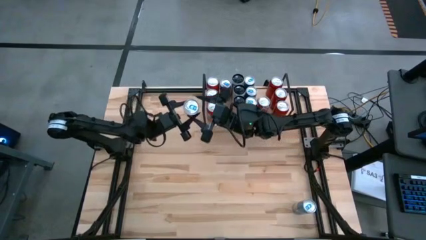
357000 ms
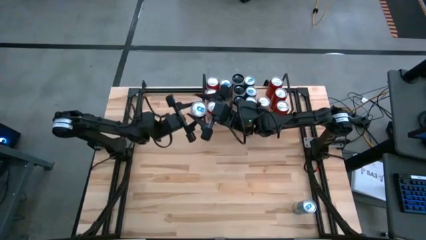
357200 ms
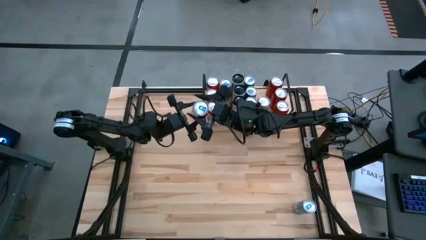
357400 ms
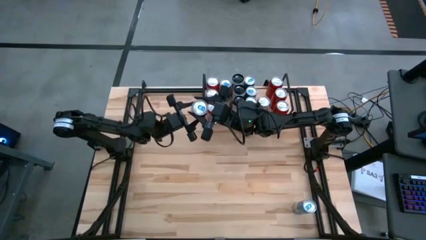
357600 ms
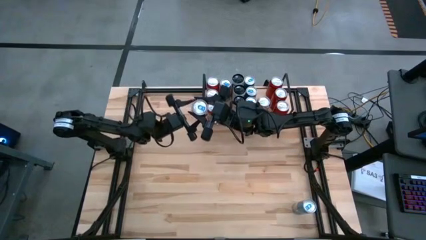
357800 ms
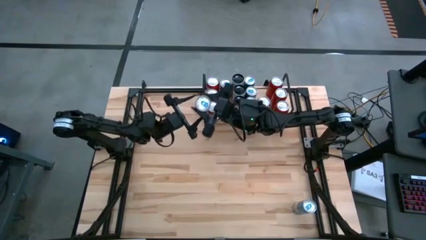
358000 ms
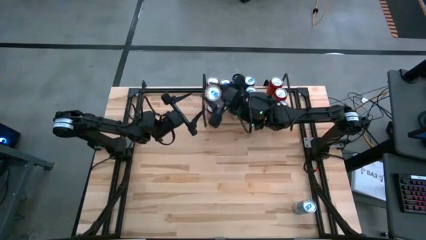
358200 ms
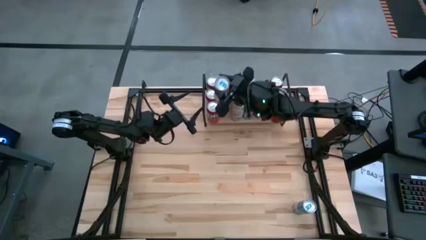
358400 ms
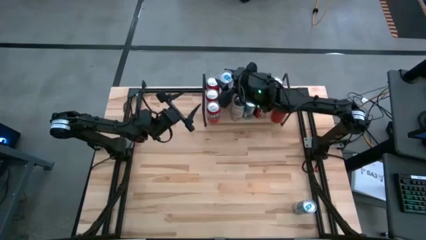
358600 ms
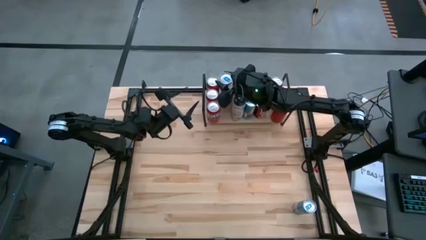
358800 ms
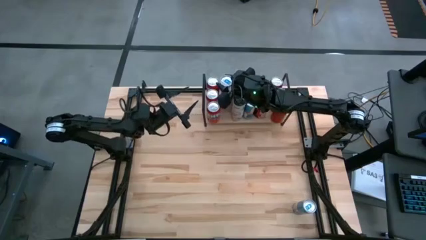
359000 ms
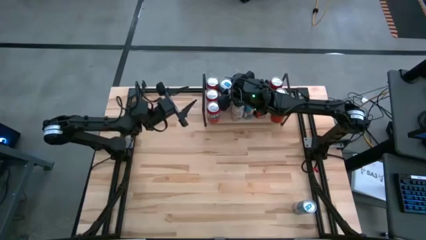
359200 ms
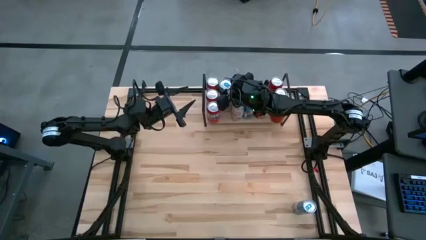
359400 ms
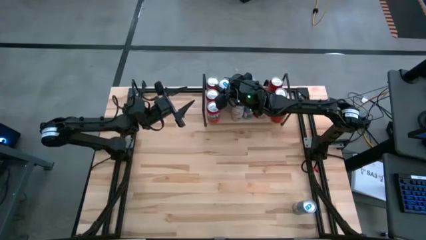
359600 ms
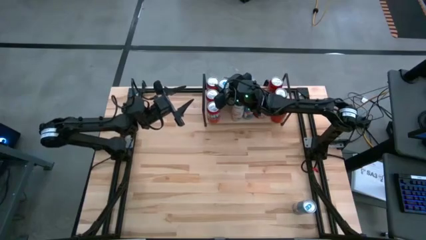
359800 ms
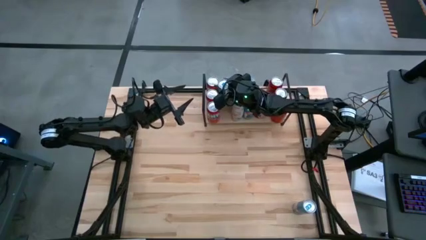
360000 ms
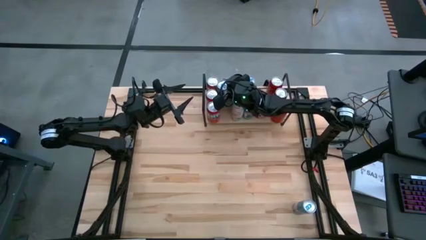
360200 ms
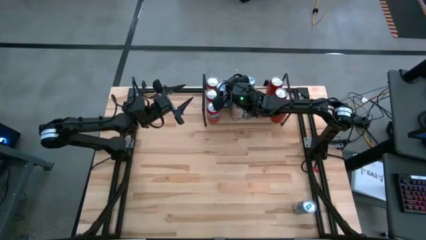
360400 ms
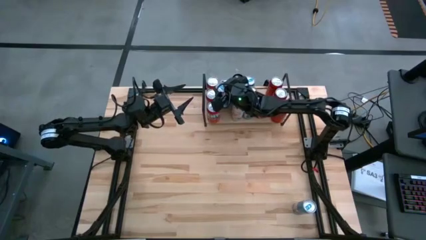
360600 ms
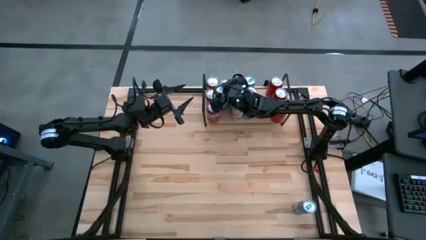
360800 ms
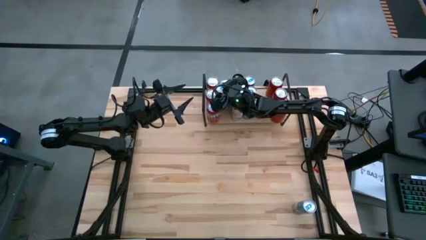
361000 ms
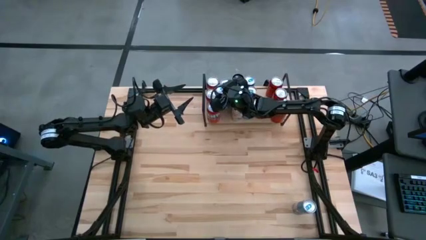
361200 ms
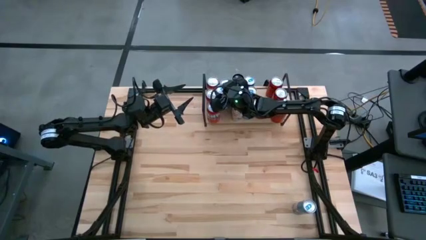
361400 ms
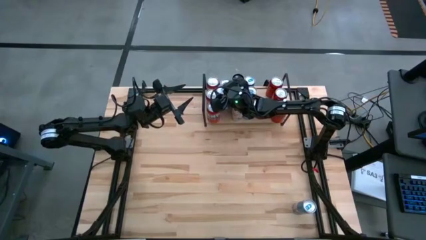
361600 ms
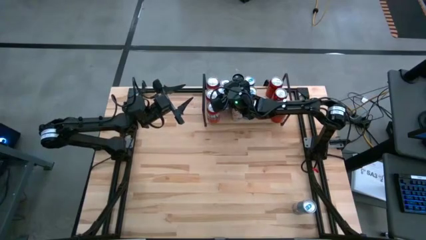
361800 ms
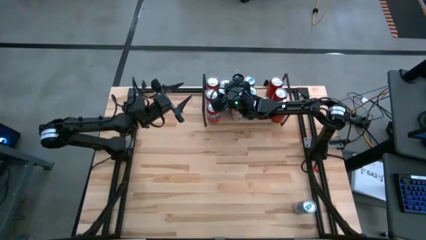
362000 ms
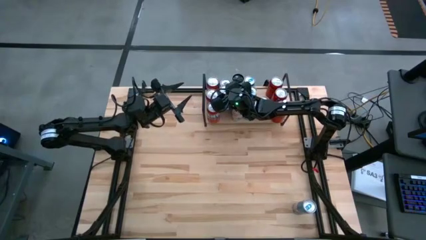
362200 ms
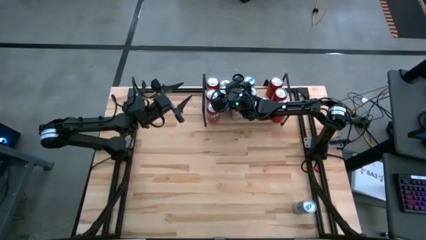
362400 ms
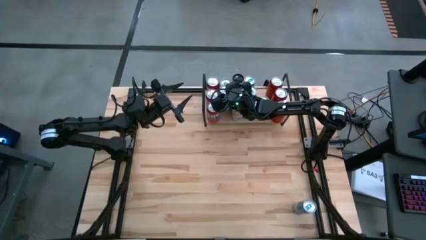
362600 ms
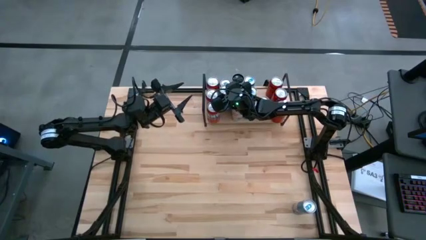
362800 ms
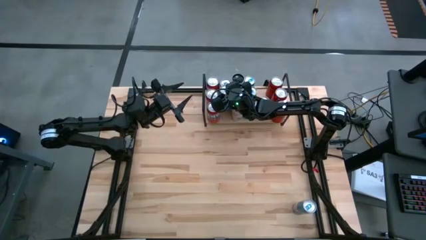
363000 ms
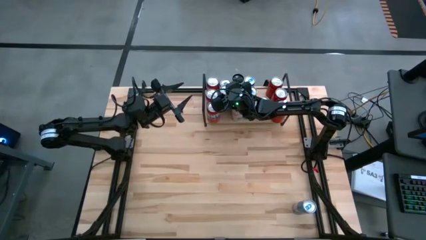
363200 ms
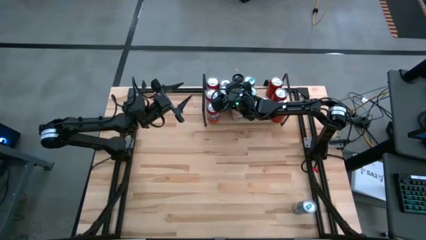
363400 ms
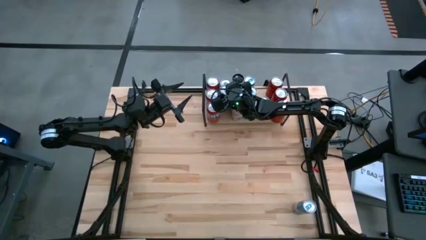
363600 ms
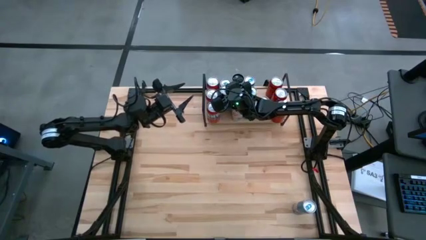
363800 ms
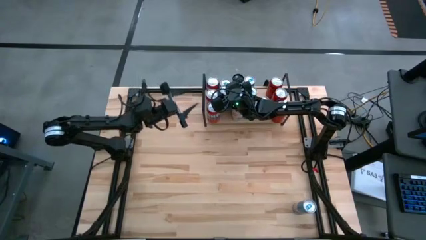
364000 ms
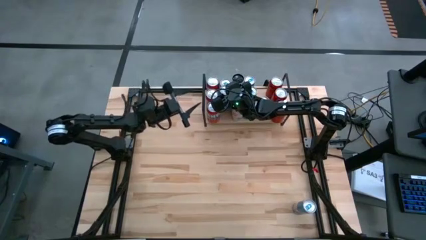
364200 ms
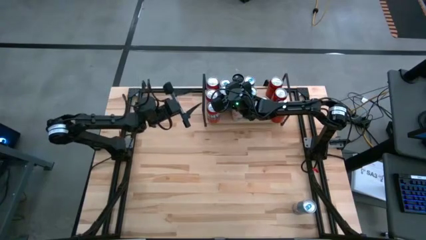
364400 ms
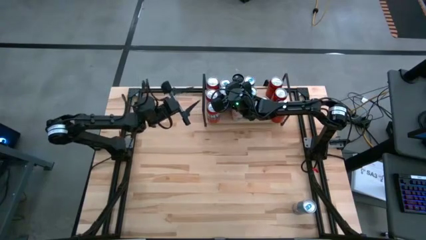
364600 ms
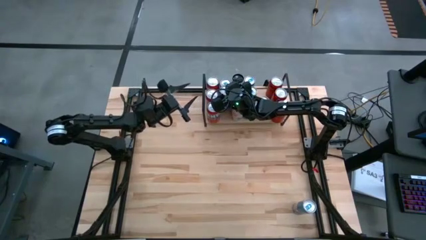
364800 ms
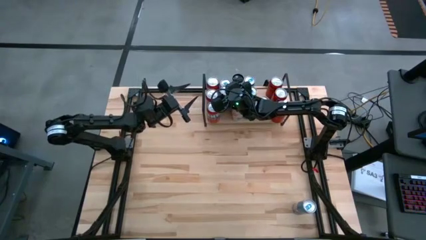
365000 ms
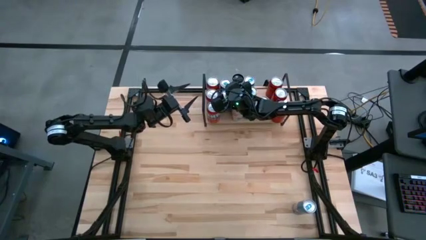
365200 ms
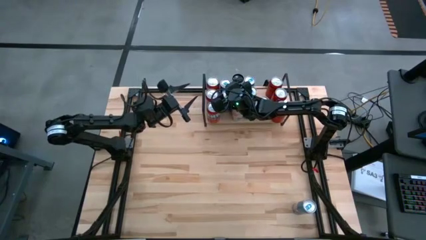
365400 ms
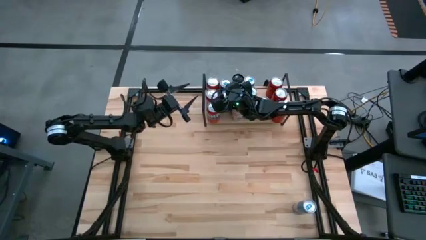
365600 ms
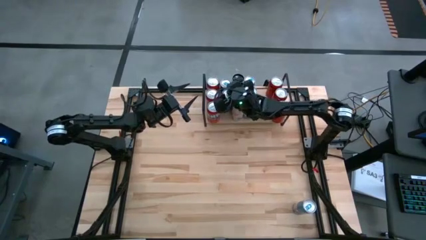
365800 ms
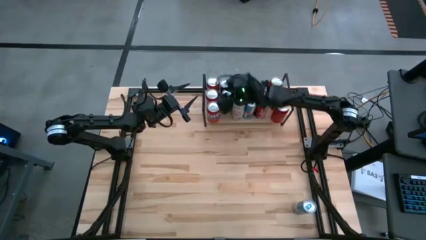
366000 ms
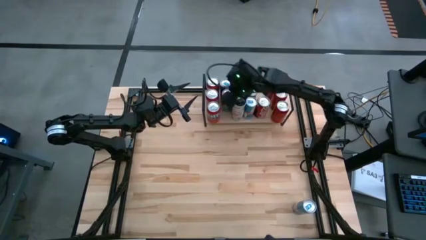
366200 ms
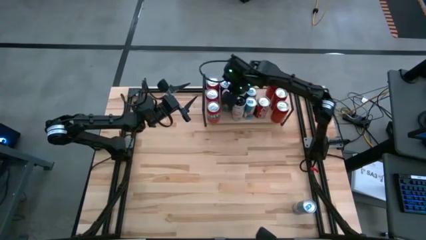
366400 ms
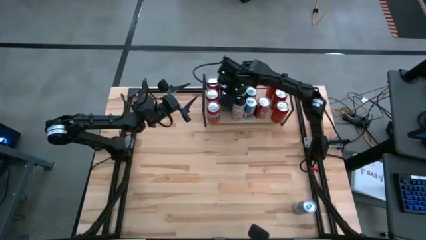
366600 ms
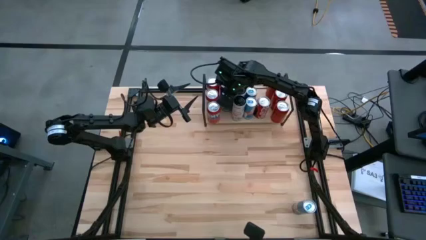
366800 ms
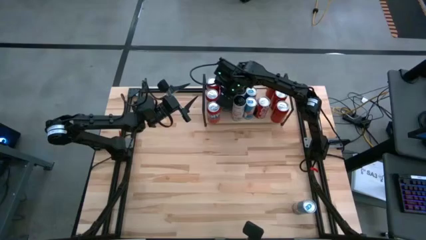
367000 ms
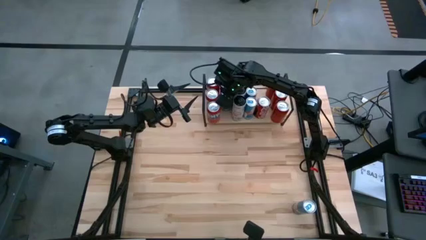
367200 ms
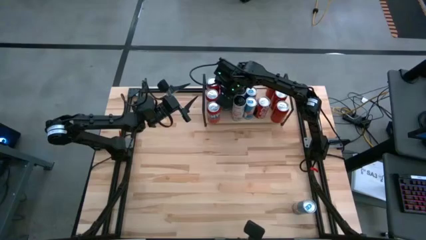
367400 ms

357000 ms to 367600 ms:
Task: Place canned beverage on shelf
Put the blue soda can on the shelf

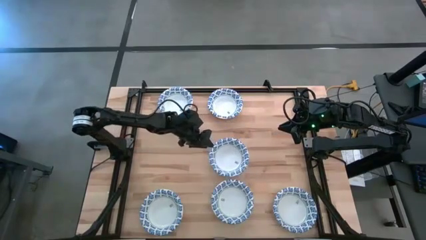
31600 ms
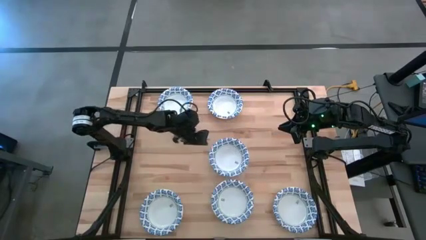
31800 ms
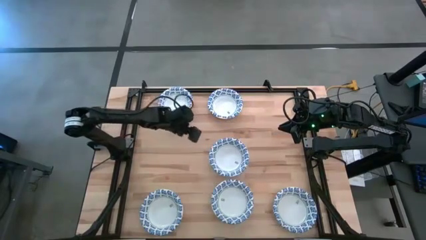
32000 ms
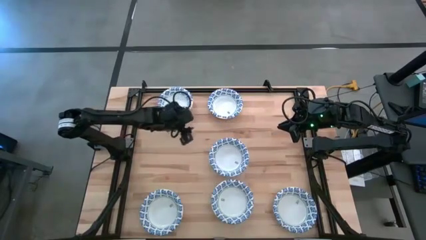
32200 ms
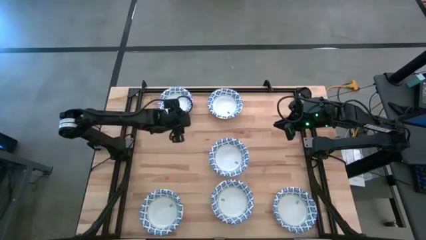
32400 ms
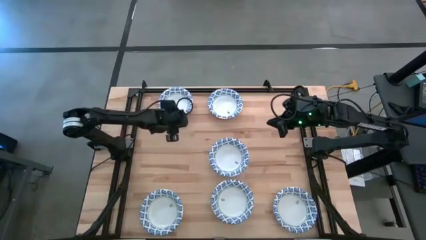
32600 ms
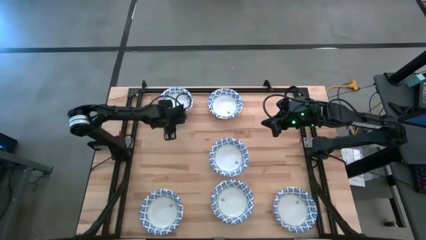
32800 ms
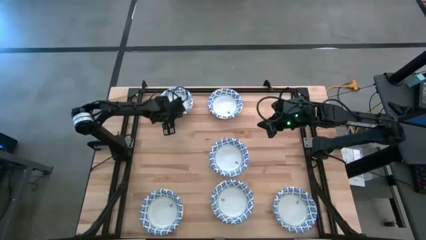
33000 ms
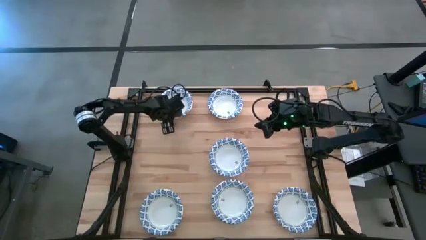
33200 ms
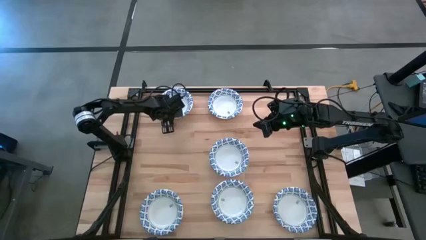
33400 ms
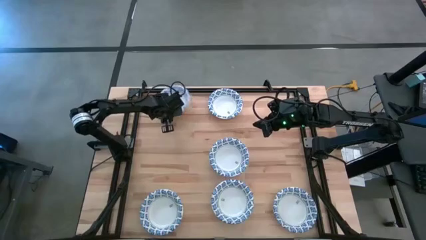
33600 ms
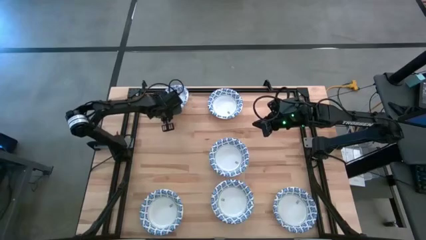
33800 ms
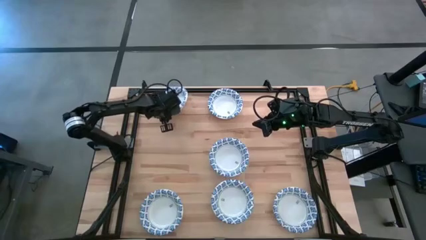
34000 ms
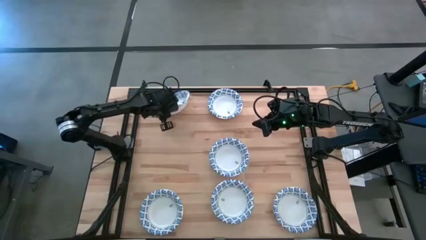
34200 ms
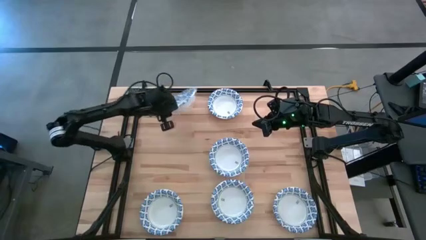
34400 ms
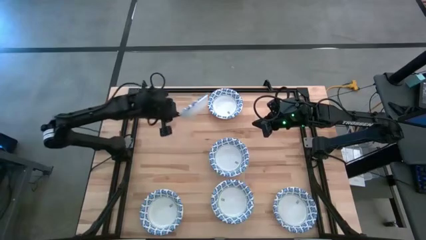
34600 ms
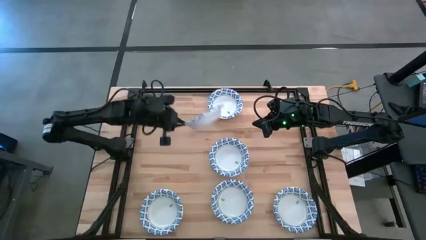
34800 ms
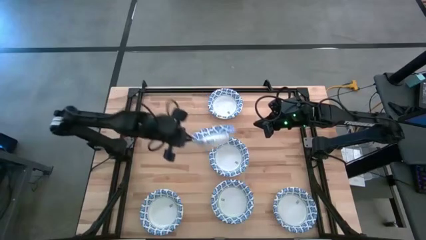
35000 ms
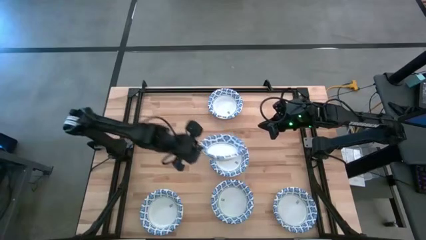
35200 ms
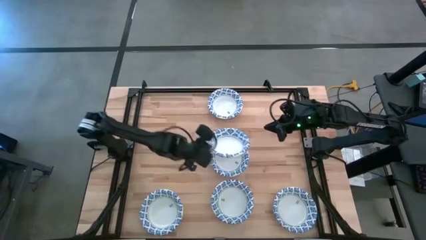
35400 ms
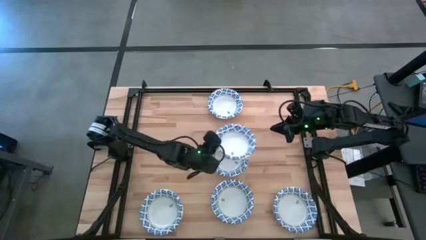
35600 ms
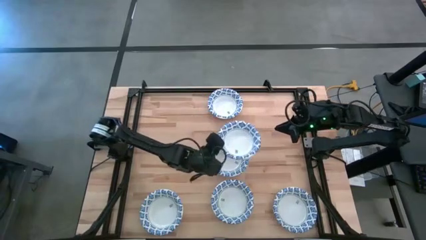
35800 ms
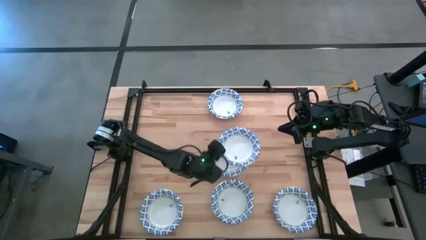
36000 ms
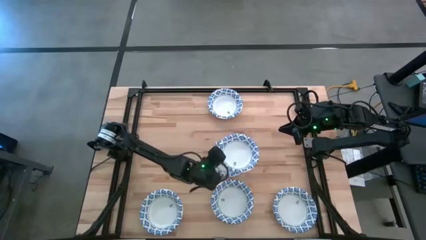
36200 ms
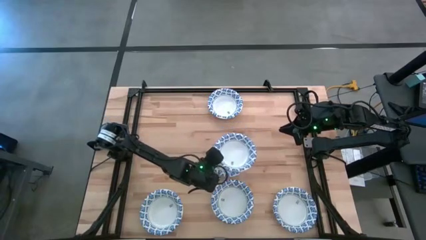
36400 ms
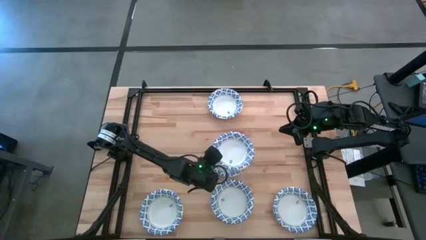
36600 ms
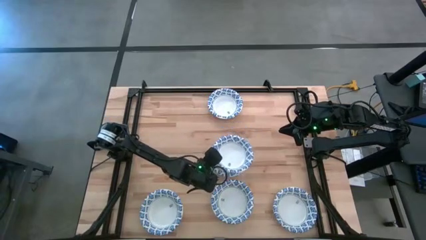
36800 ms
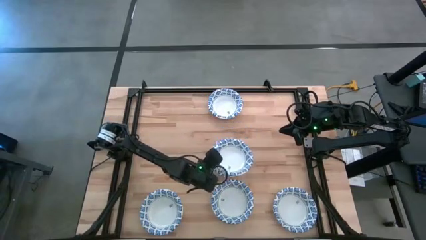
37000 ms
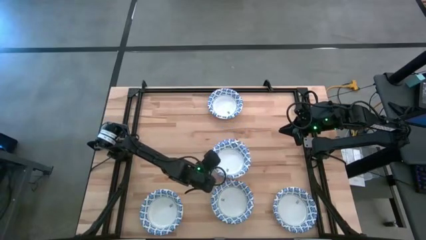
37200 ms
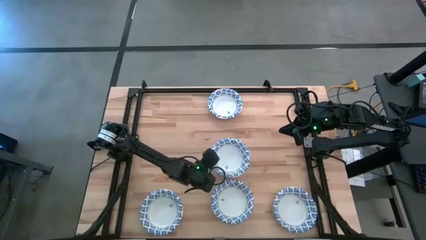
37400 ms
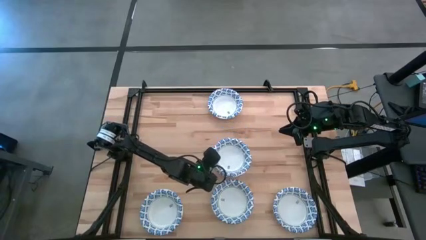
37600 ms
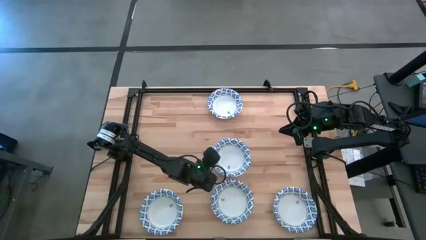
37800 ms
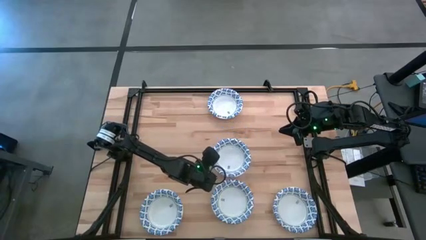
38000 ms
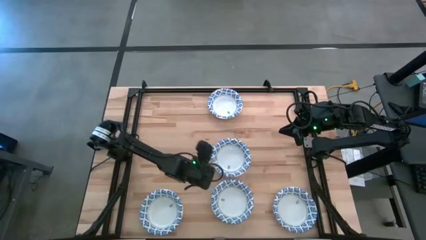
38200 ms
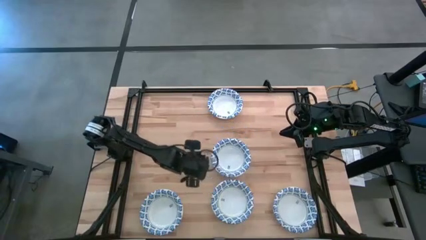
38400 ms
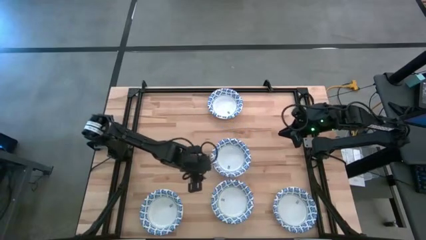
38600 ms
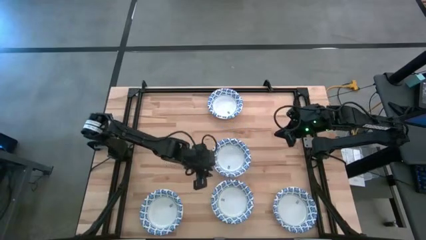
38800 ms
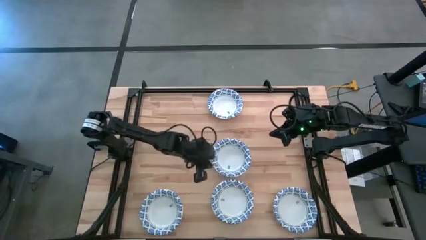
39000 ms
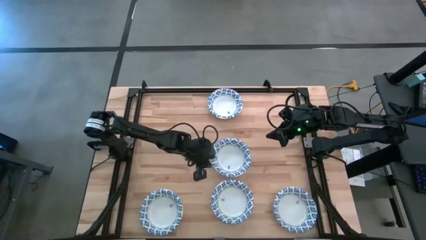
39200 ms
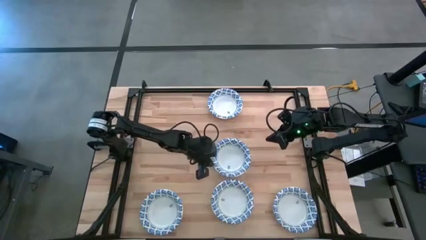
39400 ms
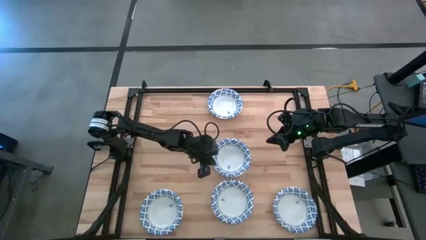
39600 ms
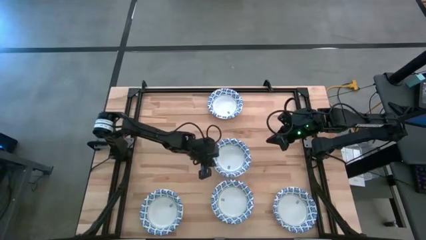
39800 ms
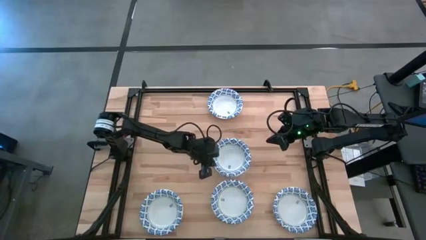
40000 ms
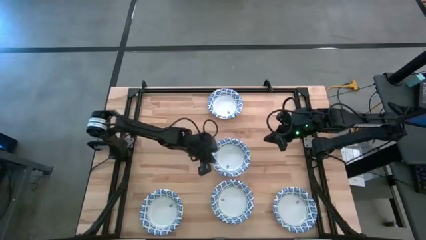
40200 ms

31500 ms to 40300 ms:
Task: Nest bowls inside each other
Stack the white patterned bowl on top of the center white patterned bowl
